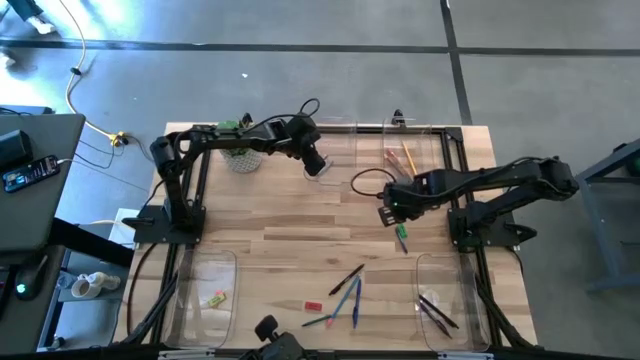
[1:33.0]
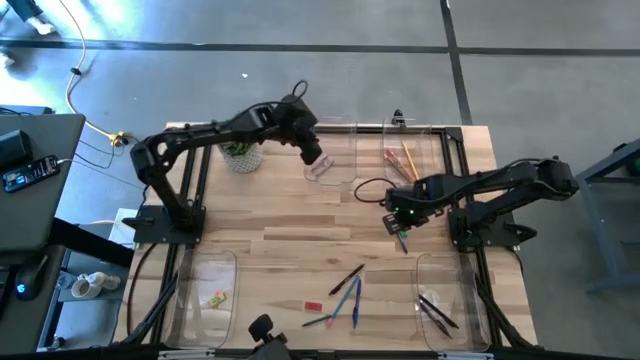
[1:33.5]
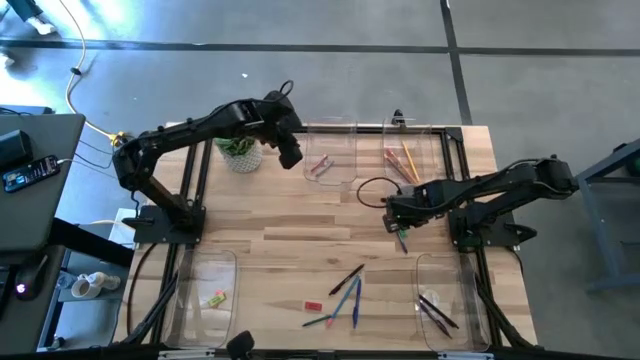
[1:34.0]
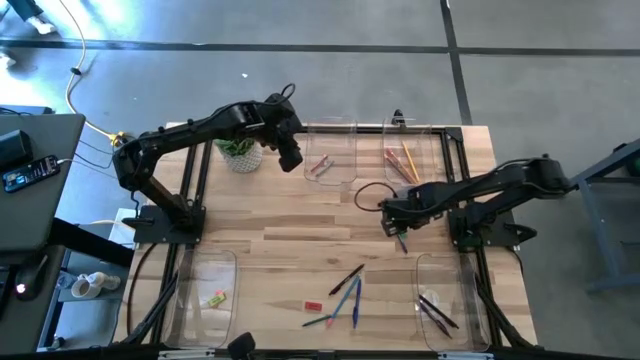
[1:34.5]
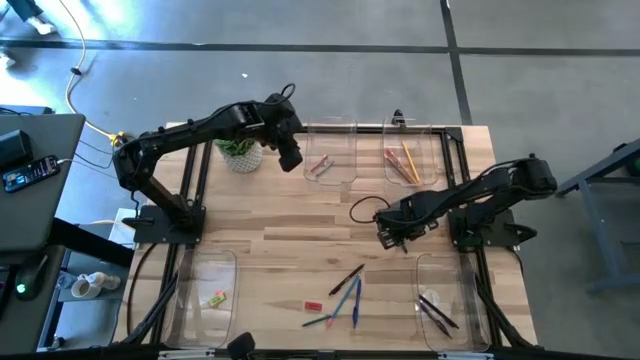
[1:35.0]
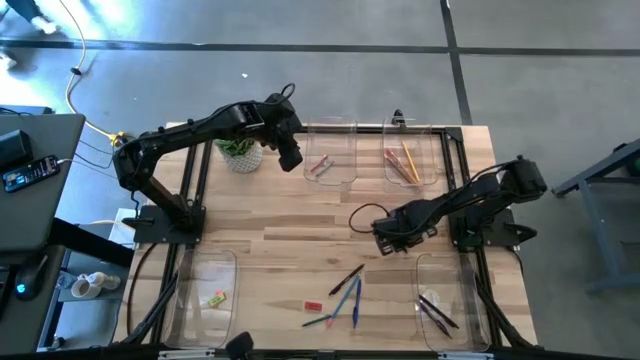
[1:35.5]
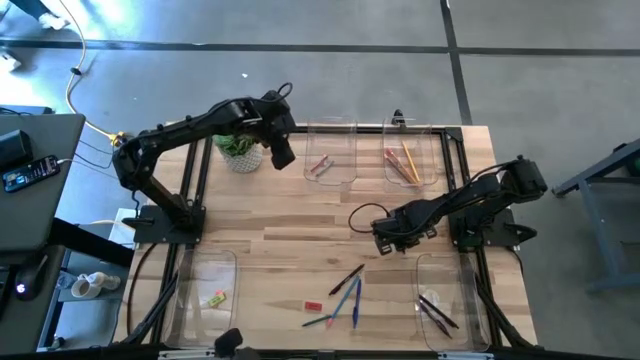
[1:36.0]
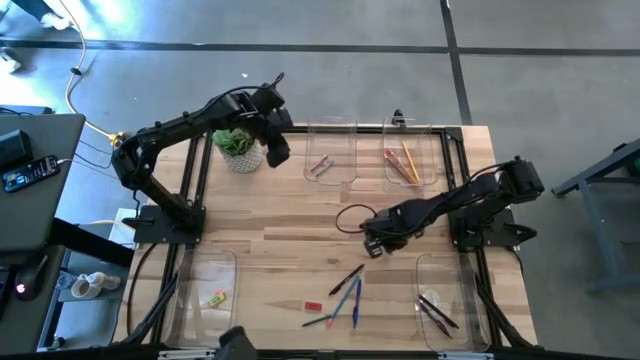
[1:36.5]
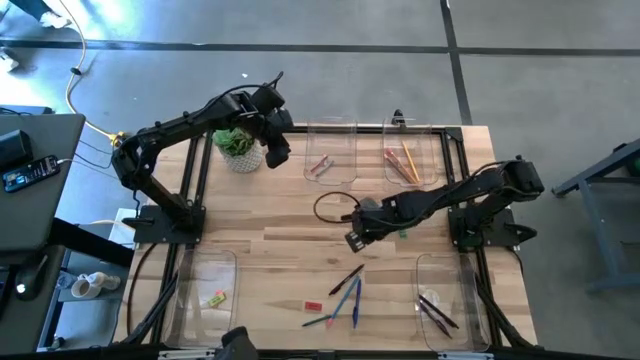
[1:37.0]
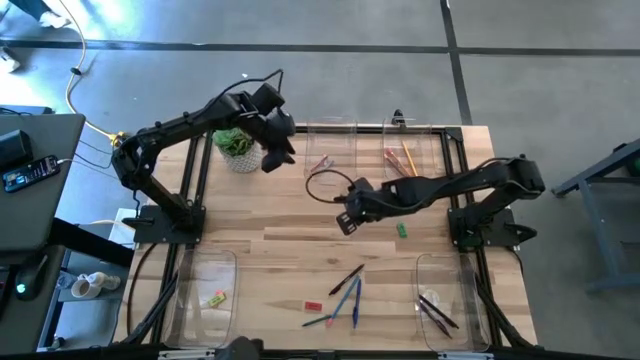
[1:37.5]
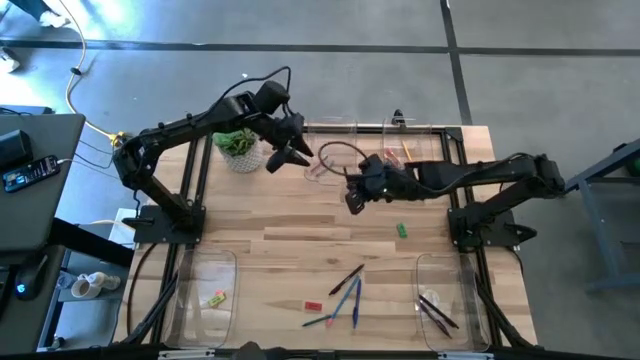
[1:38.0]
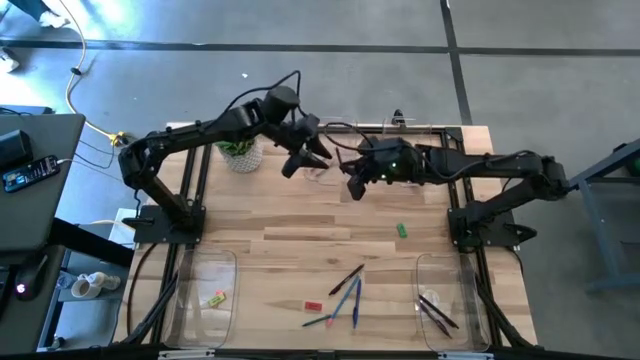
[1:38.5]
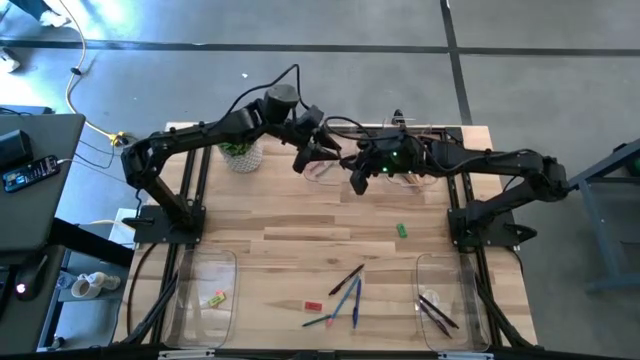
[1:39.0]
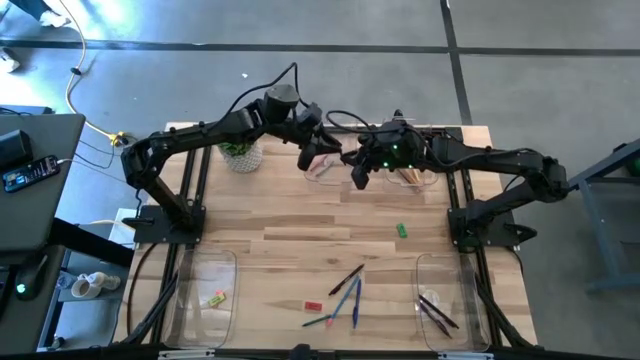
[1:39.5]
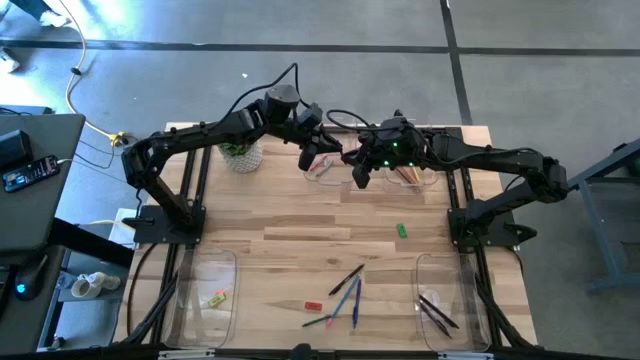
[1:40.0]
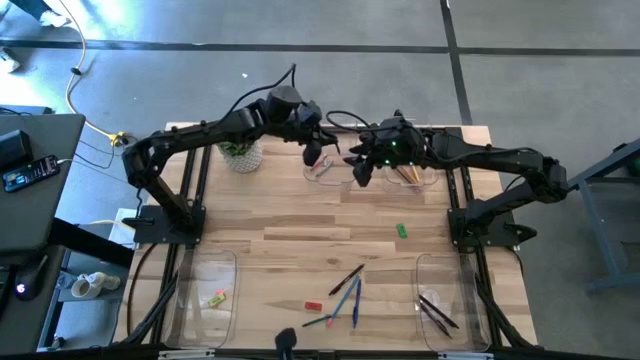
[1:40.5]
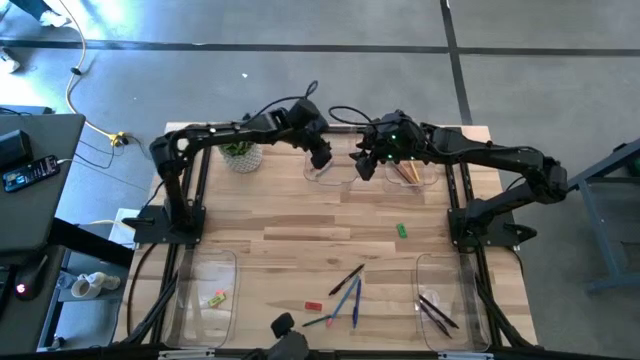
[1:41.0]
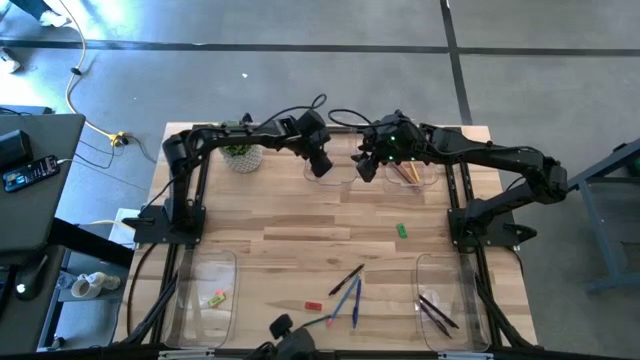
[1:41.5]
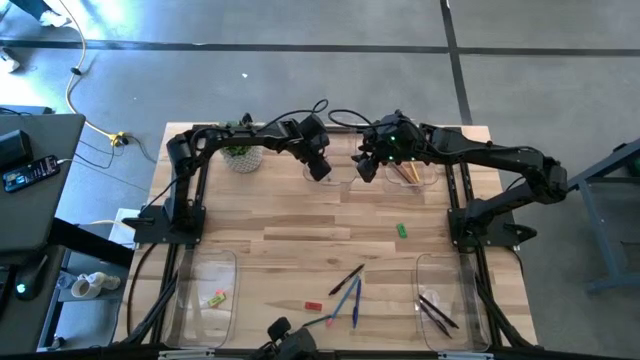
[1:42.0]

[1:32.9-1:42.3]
Task: Sort crayons/erasers/pens/pencils in bins
Put the blue crayon into the top left transparent bin

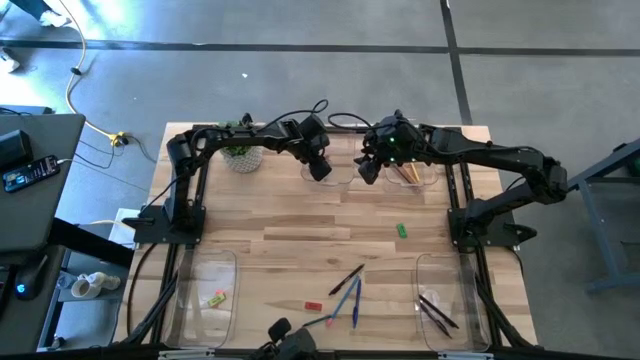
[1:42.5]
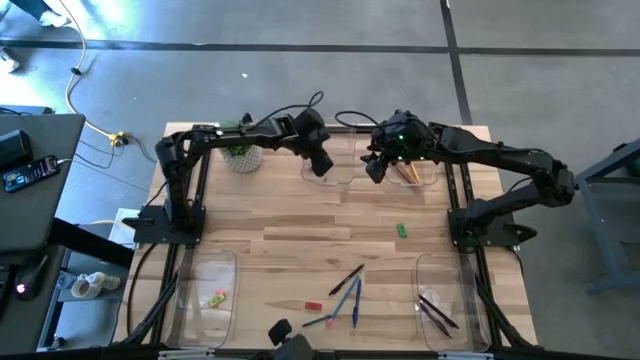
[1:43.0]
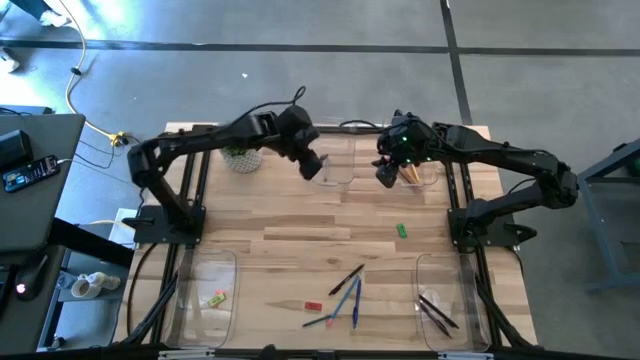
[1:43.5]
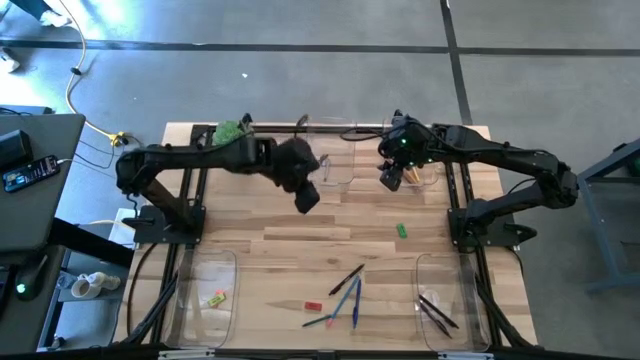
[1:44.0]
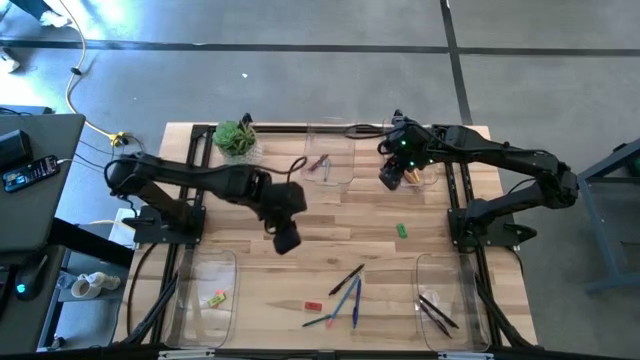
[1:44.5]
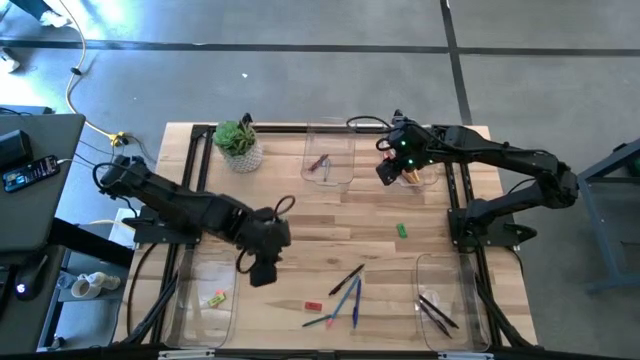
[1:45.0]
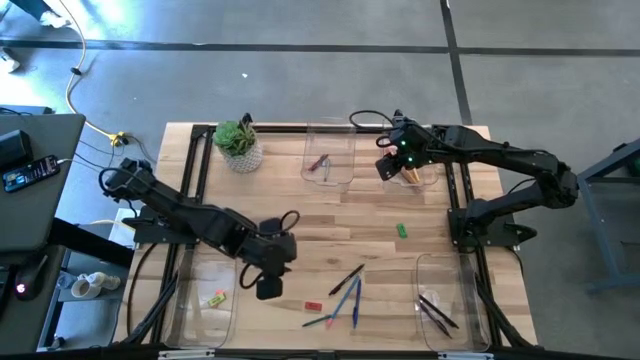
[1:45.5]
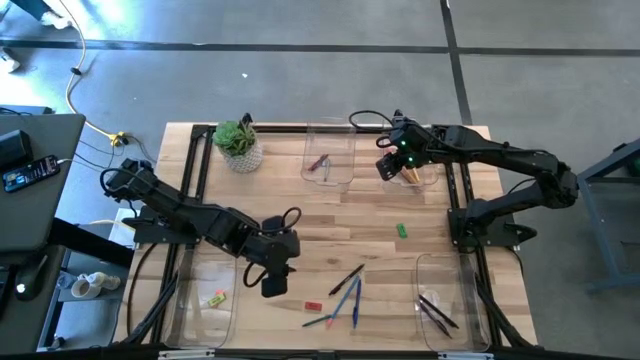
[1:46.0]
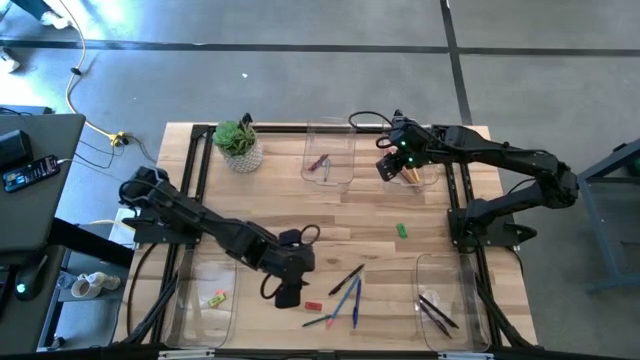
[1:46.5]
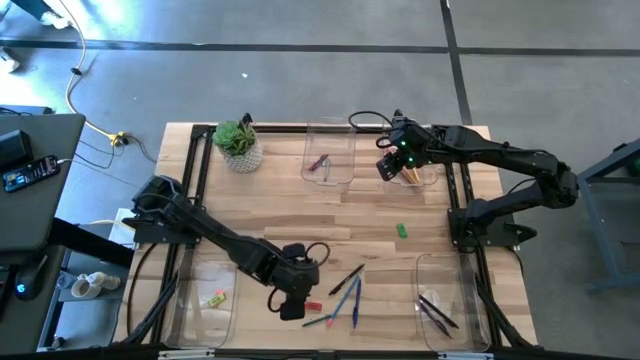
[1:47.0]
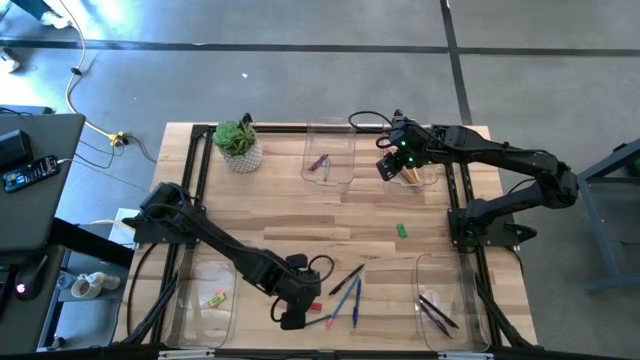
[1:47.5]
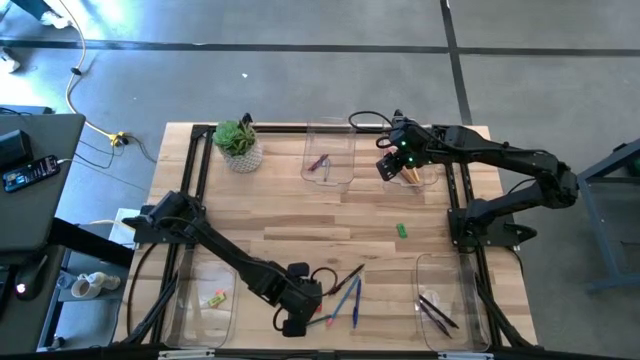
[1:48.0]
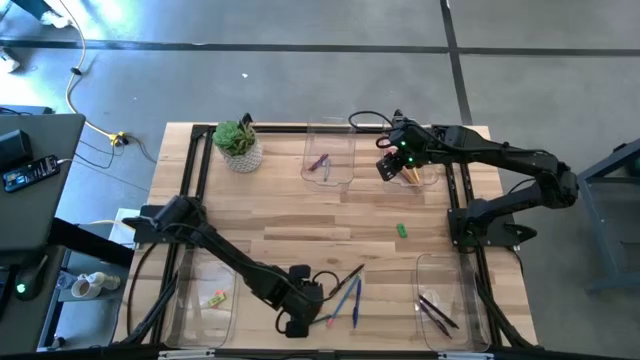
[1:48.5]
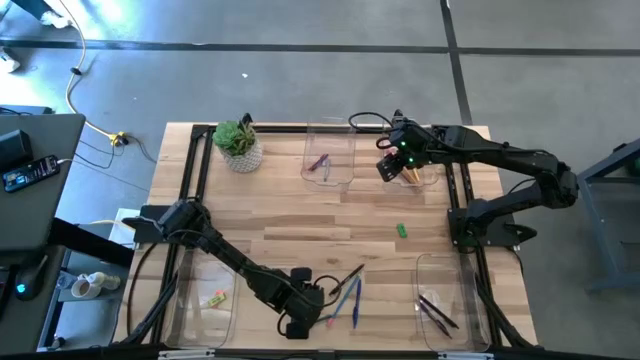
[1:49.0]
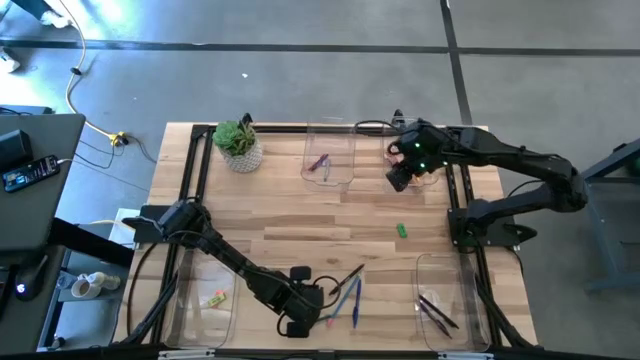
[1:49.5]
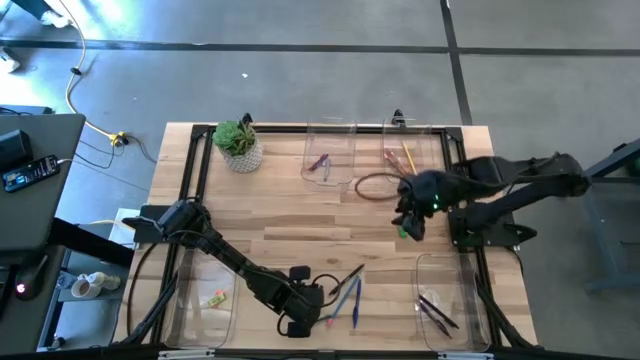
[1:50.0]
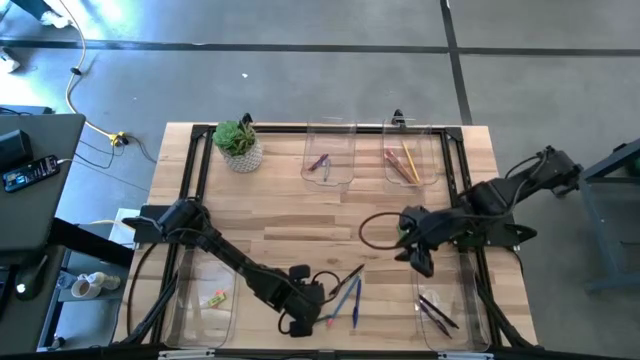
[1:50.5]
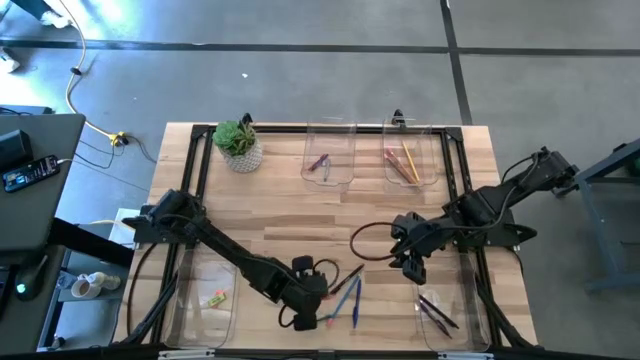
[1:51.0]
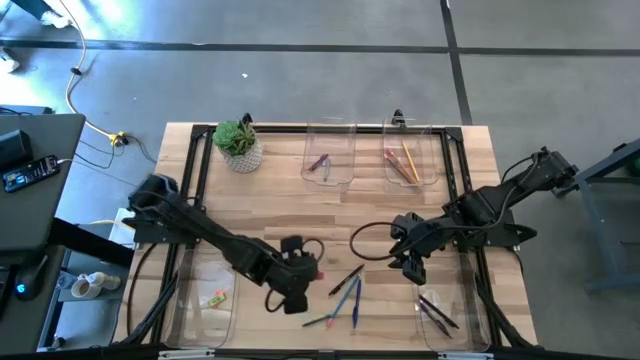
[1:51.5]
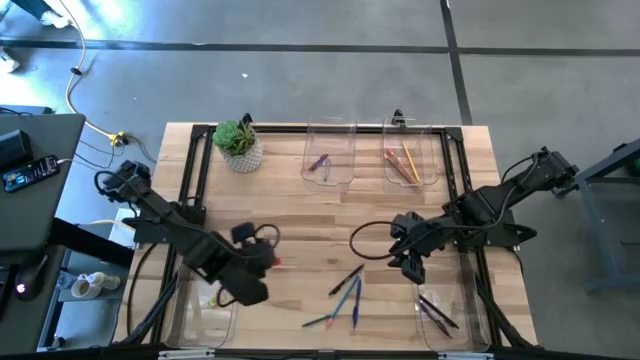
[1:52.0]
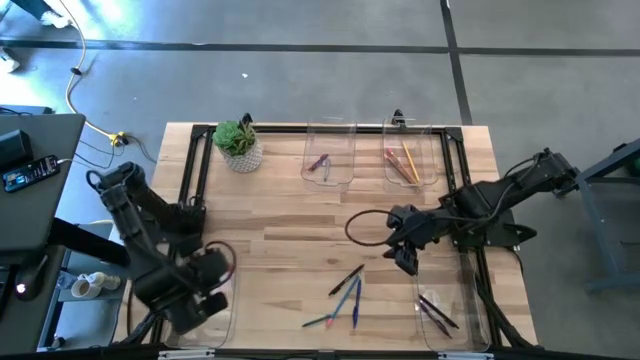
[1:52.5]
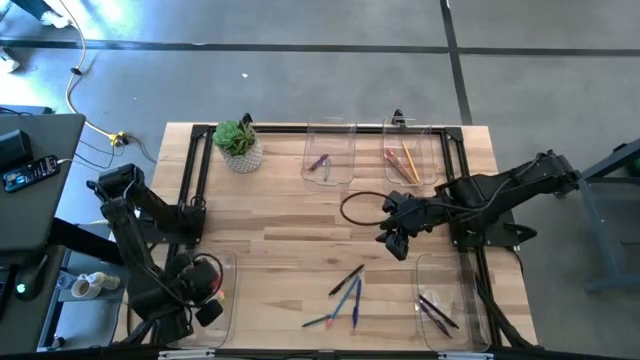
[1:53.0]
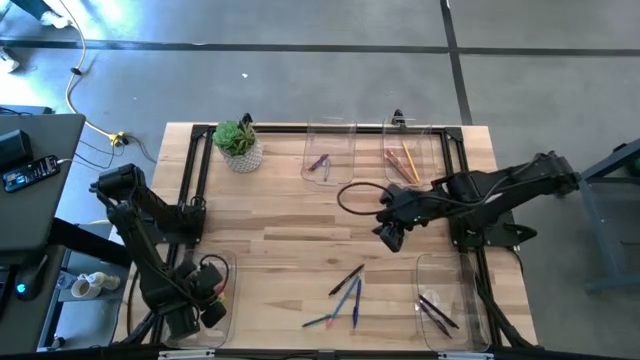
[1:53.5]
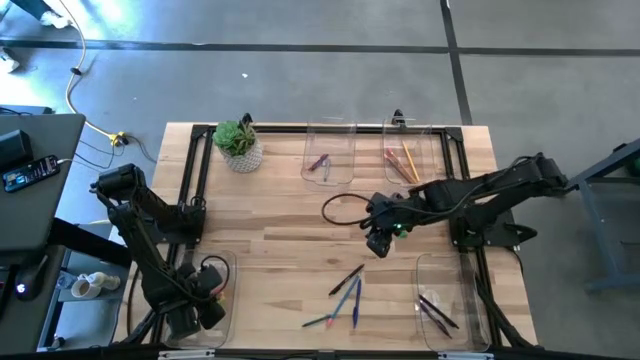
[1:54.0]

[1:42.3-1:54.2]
Put the red eraser into the bottom left transparent bin

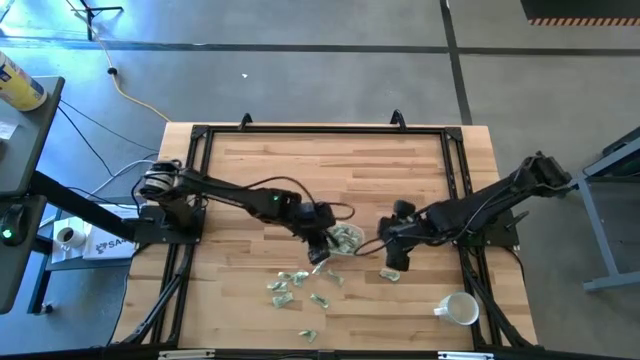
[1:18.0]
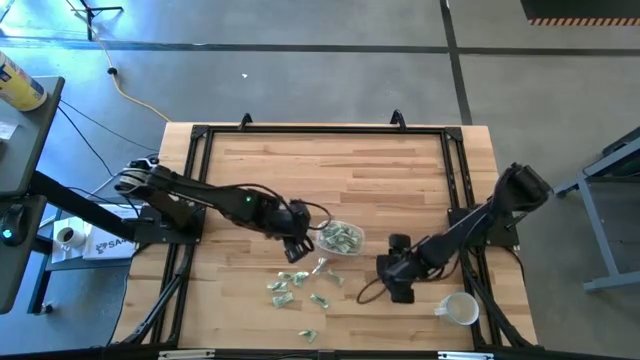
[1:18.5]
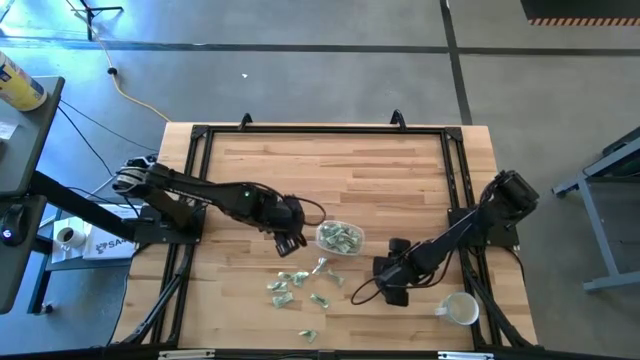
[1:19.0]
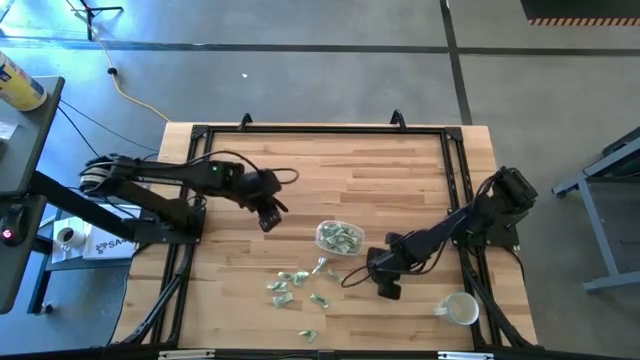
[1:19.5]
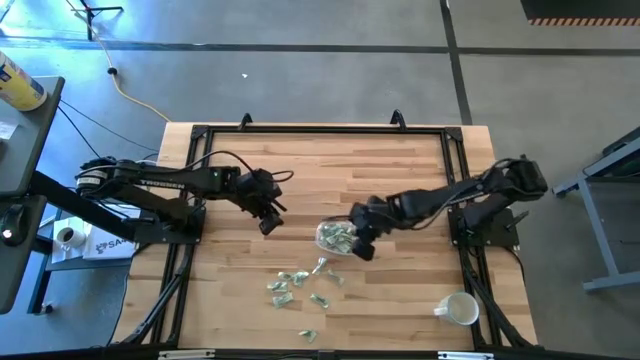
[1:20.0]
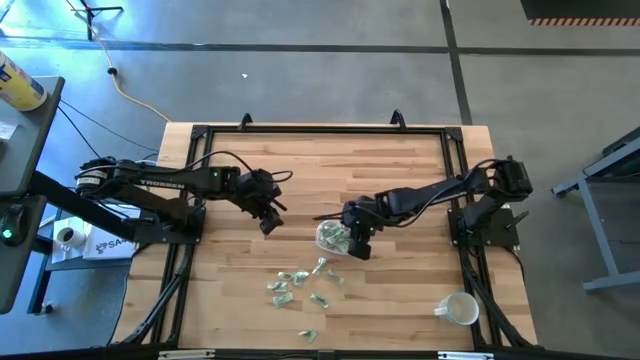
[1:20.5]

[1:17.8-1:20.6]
Task: Pick and place Stevia / Truvia into bins
Put the green stevia packet into the transparent container
